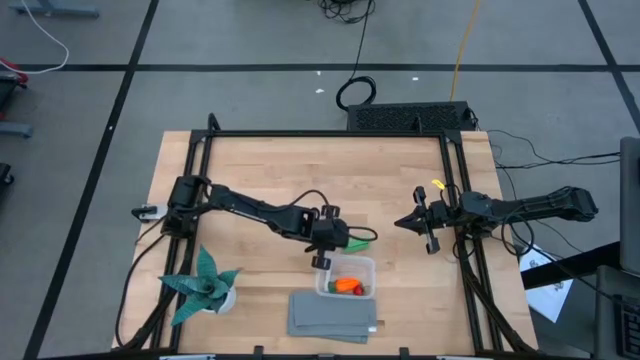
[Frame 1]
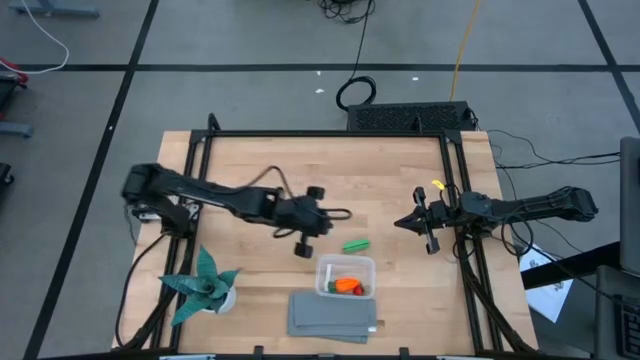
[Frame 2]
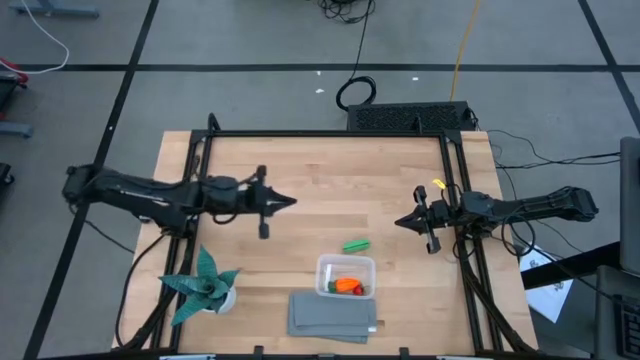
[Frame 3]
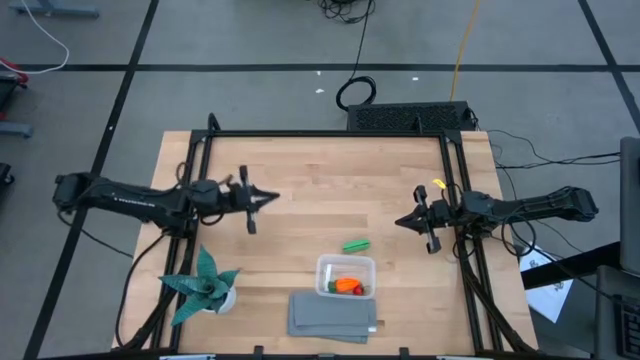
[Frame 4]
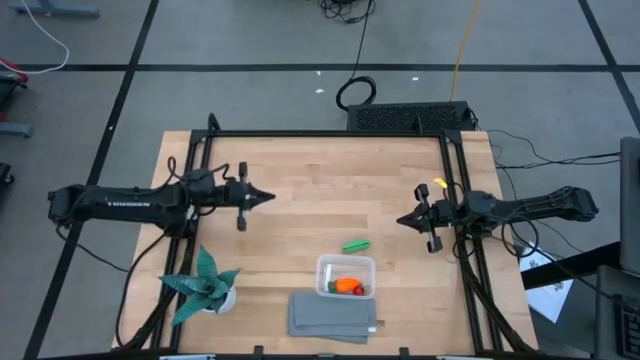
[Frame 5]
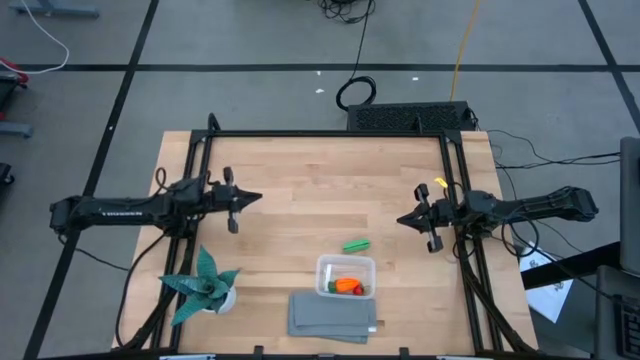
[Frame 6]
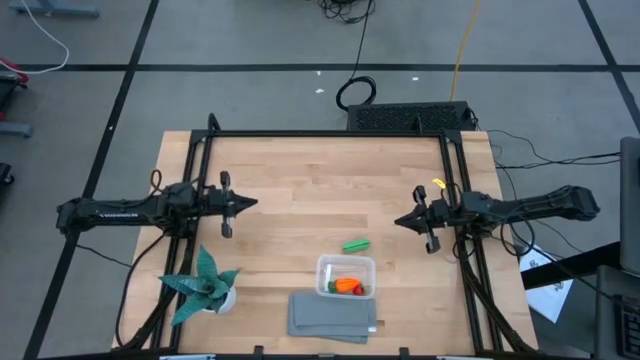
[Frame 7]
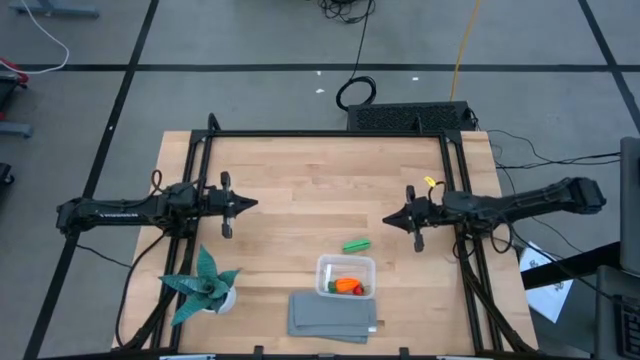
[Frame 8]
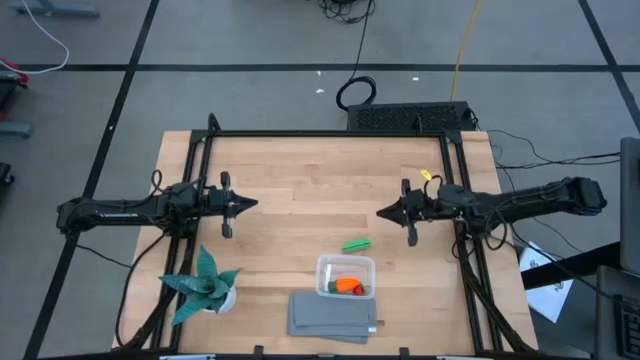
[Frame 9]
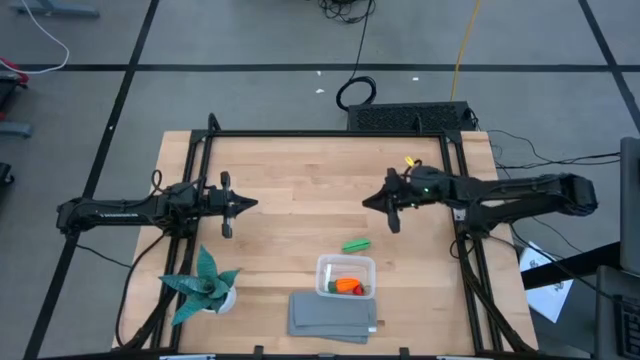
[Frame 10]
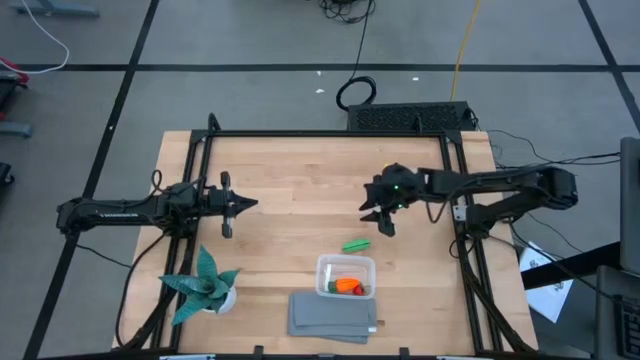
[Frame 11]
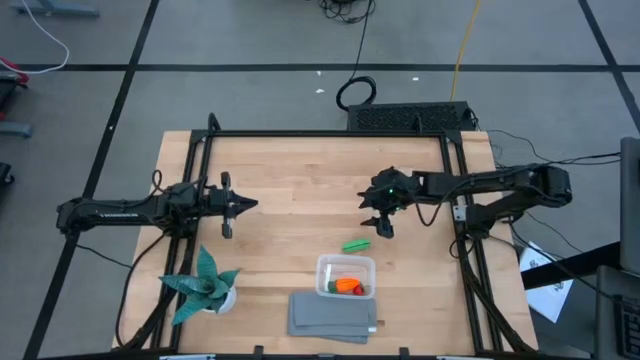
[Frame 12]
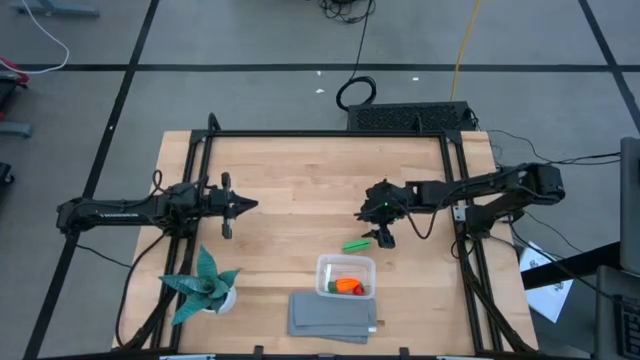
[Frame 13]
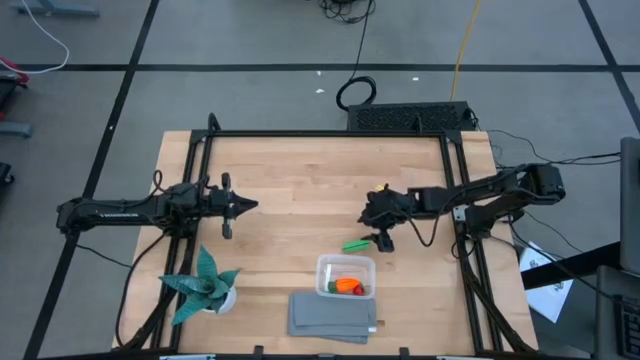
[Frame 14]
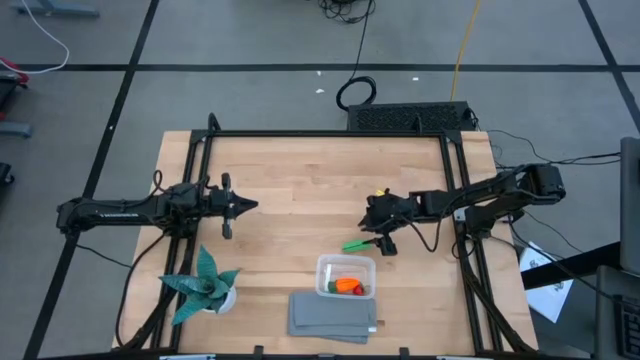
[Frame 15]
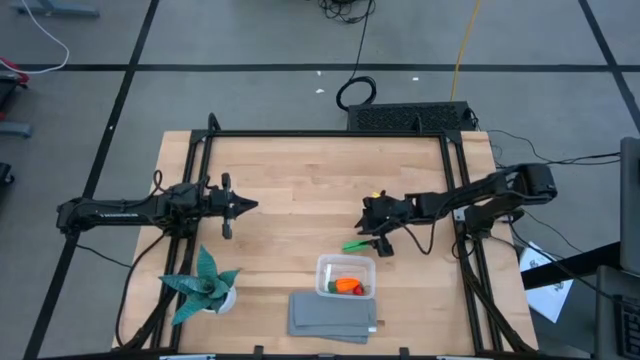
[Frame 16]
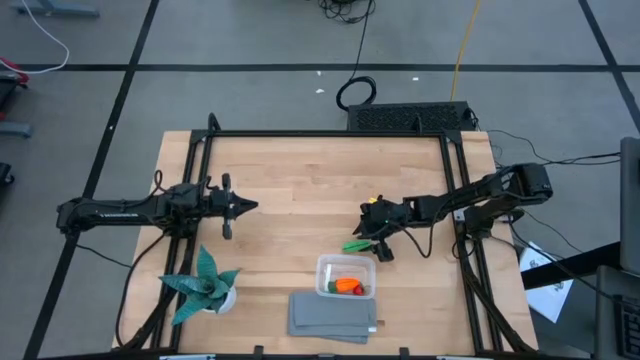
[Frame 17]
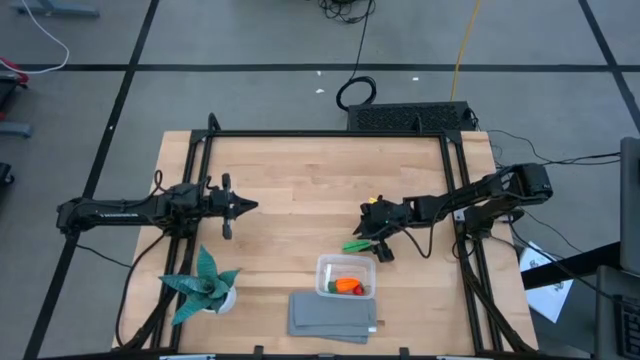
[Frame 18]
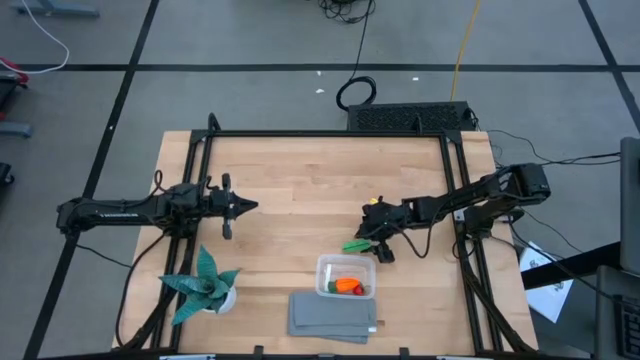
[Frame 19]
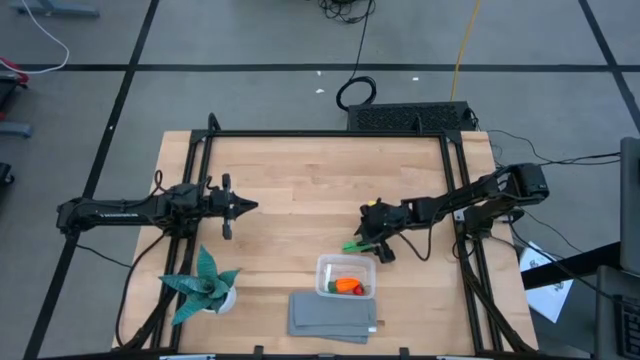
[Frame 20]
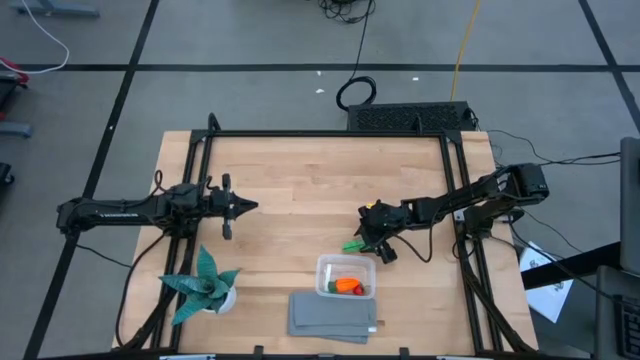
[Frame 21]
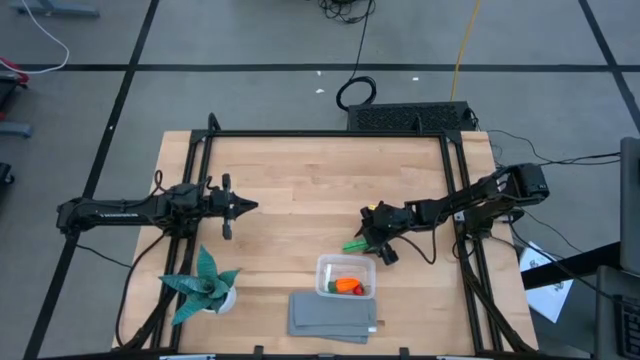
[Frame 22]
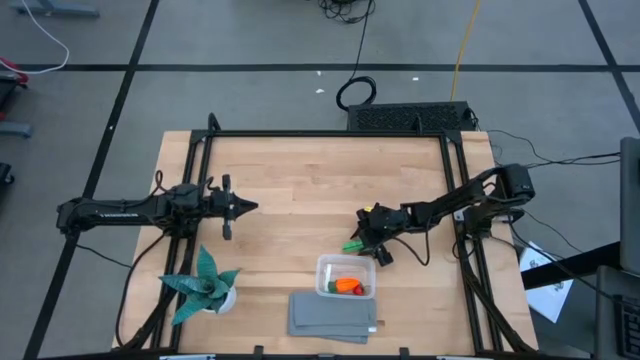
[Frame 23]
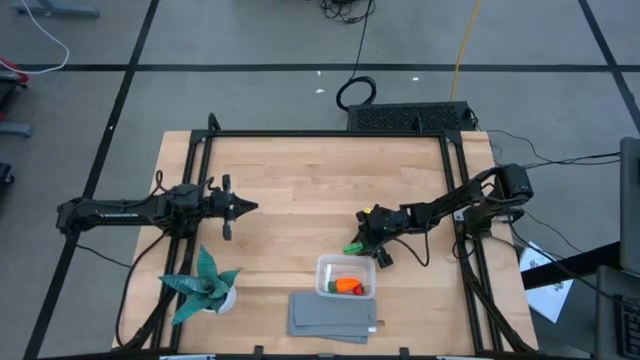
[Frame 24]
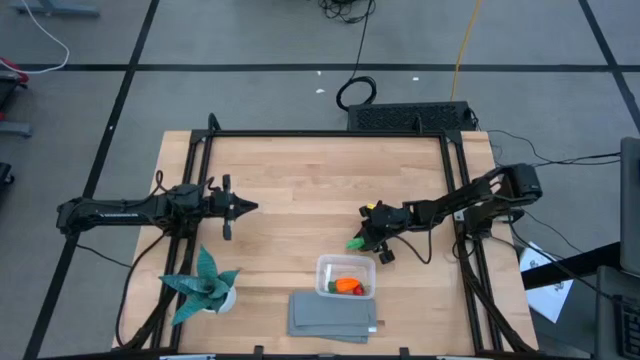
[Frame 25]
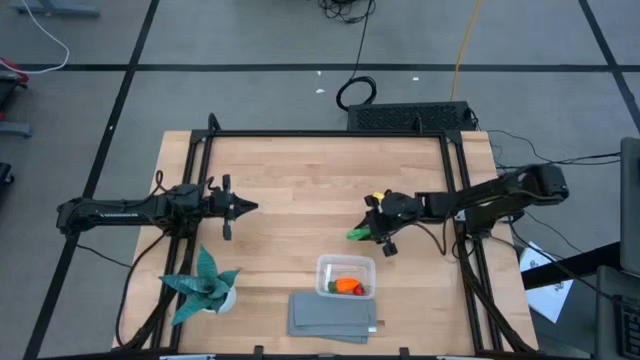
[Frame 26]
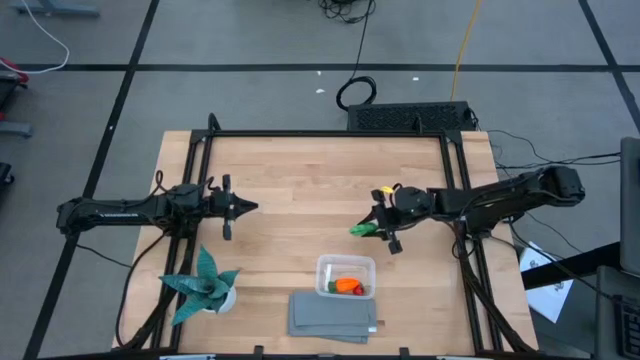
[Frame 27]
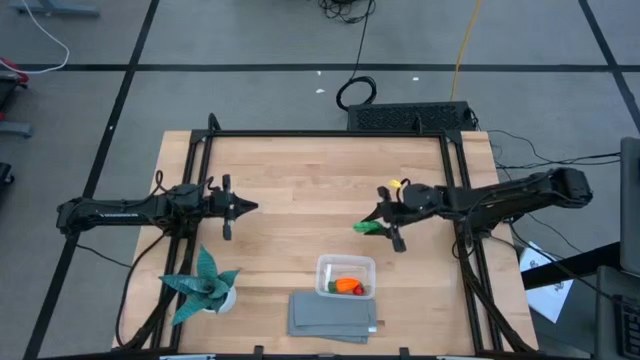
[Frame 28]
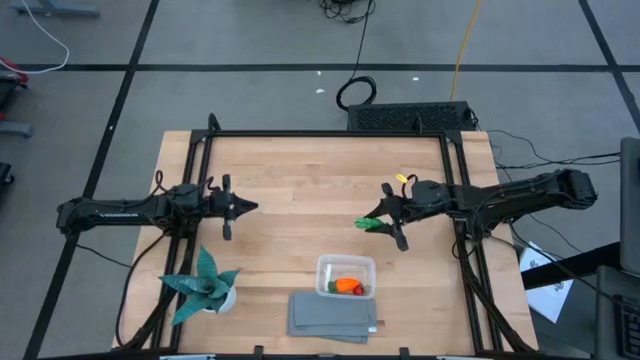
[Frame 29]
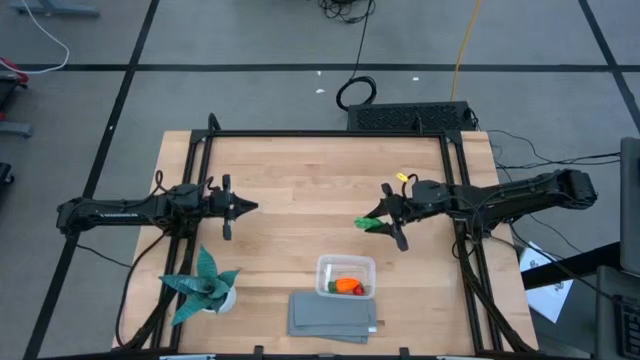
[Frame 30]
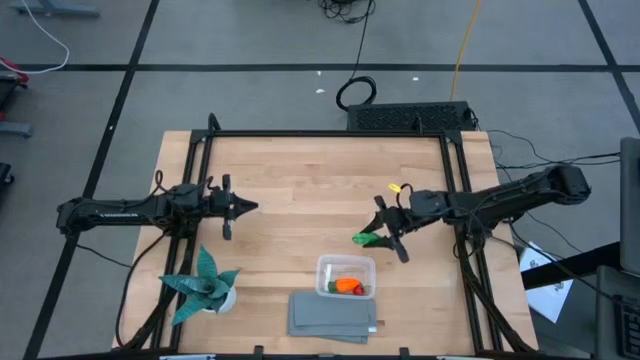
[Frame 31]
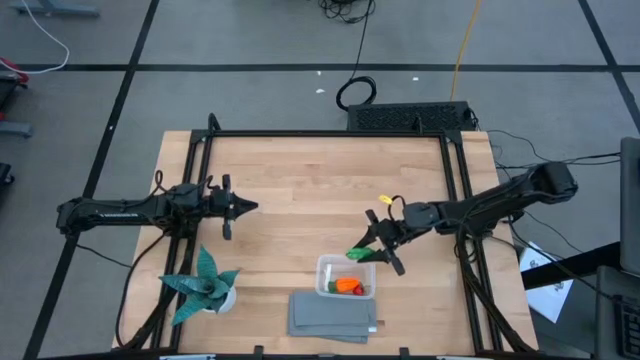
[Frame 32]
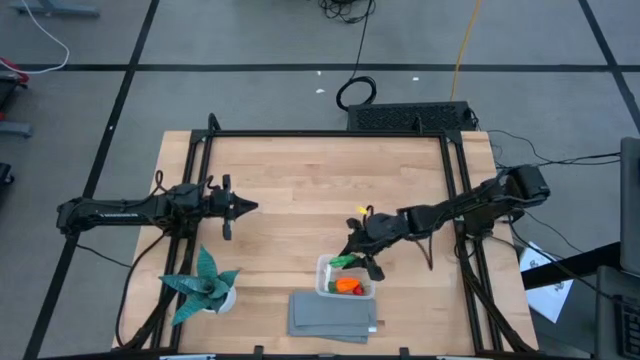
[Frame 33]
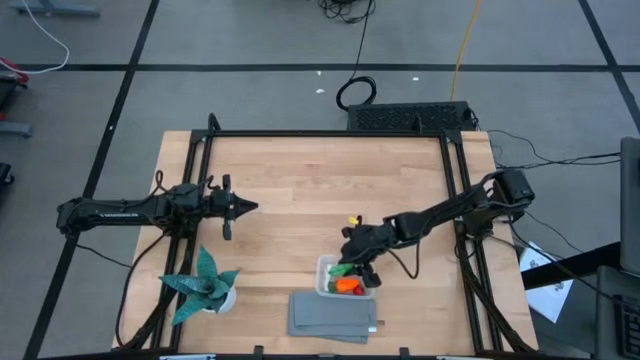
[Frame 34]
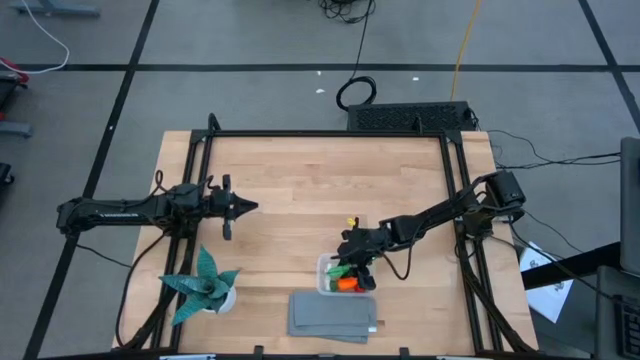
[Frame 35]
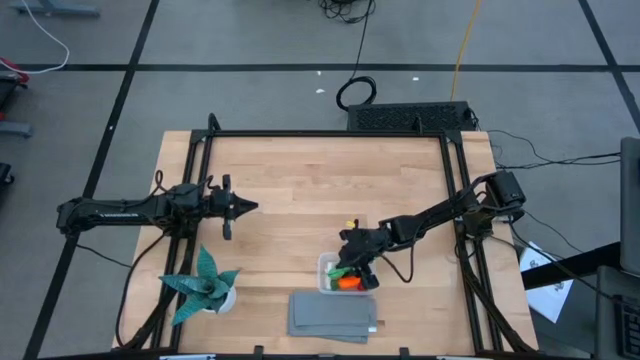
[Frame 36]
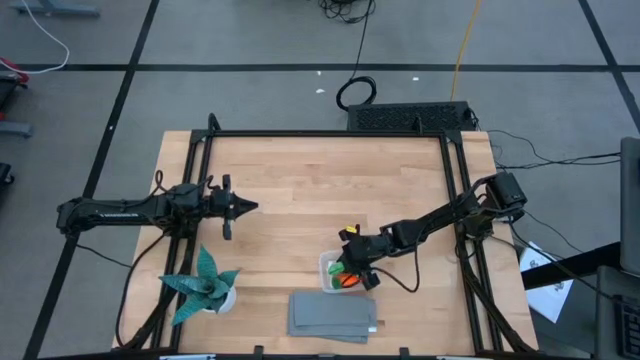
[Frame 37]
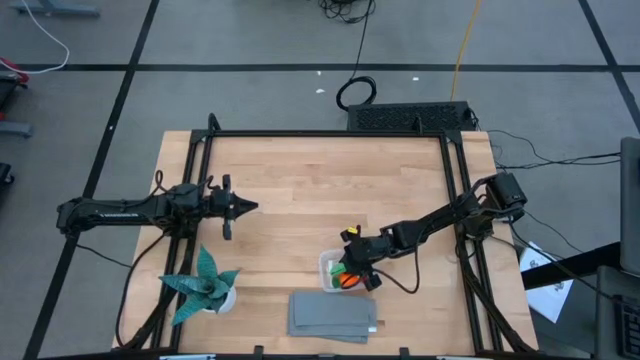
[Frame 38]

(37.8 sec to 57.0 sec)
Task: Pick and placing Produce into tupperware
Put the green pea into the transparent bin

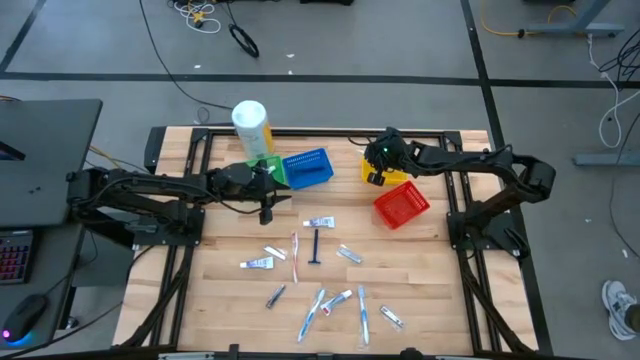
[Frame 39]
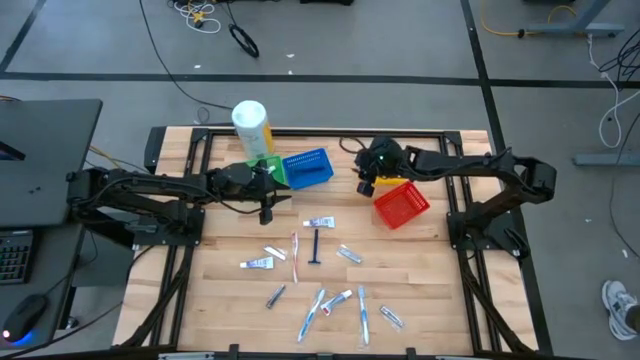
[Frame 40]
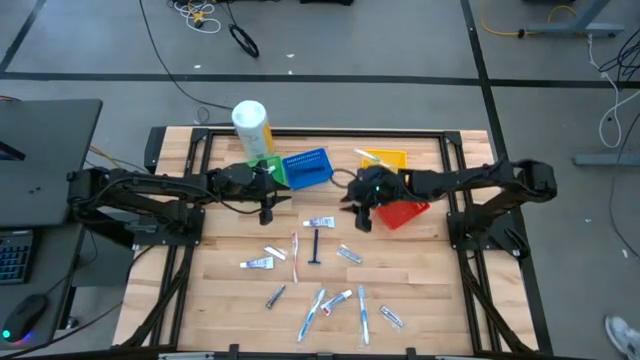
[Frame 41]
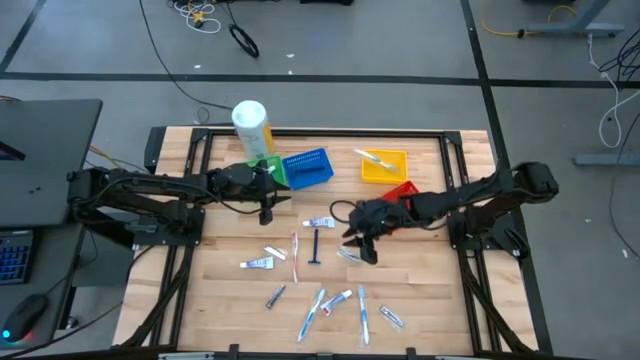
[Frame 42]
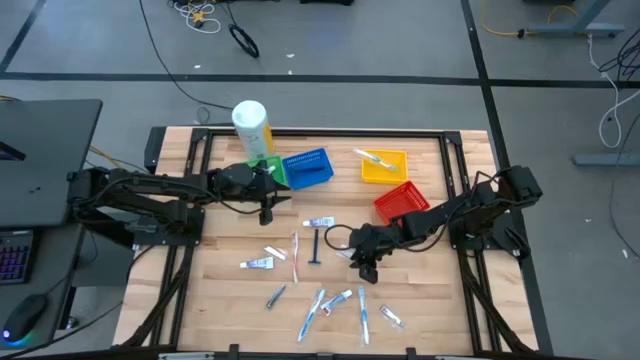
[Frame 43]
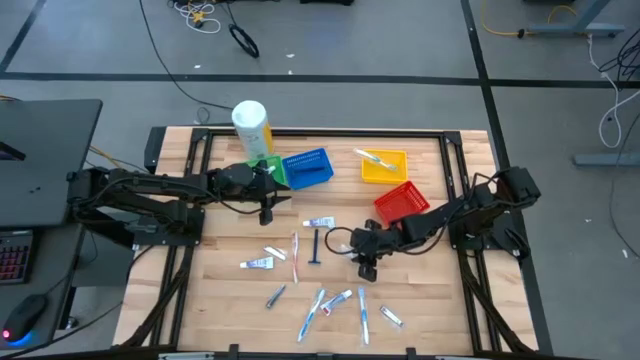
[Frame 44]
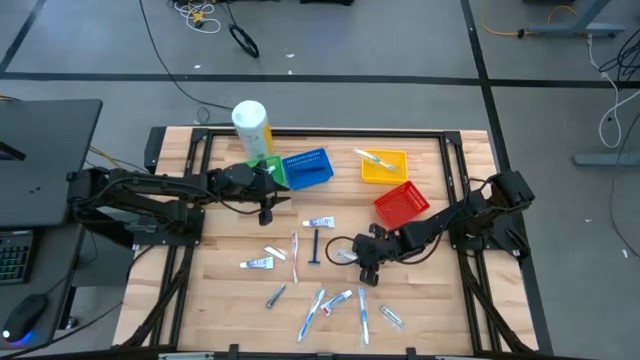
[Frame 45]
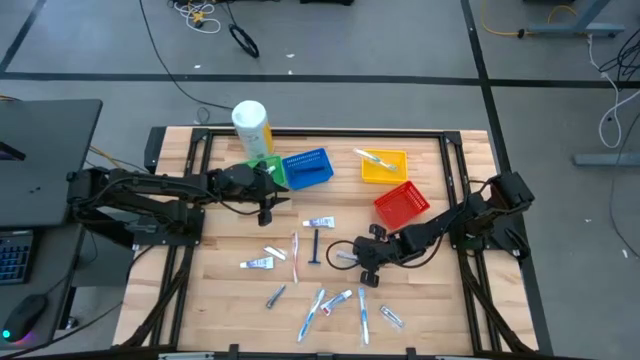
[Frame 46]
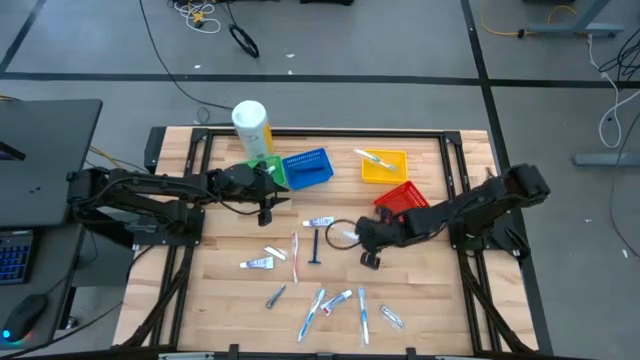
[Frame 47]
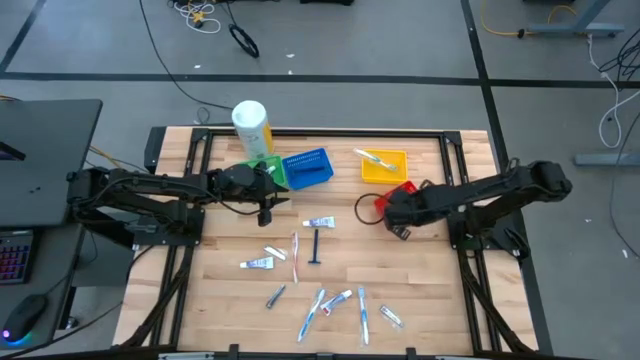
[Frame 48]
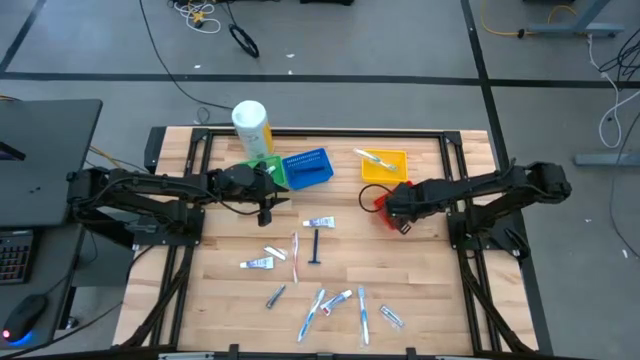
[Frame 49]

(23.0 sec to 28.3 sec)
Task: Pick & Place Travel size toiletries
Put the silver nail cutter into the red bin
